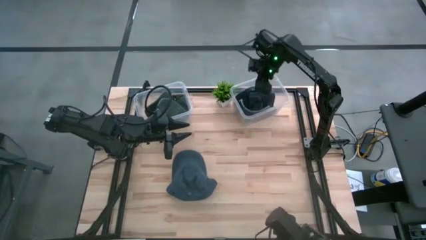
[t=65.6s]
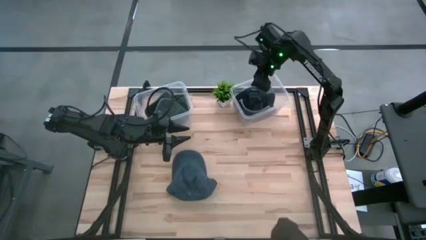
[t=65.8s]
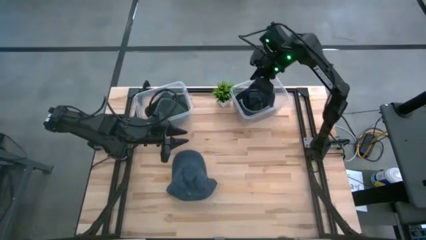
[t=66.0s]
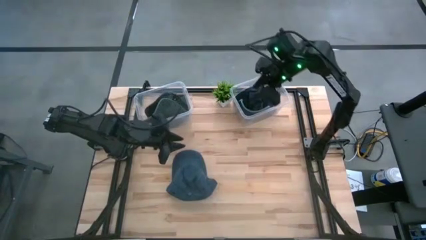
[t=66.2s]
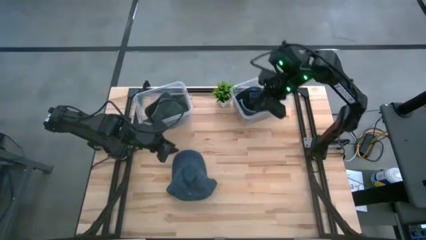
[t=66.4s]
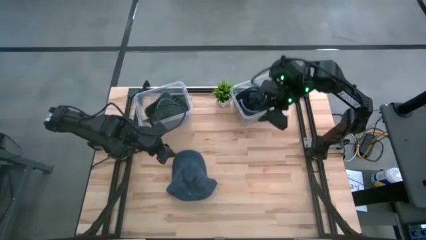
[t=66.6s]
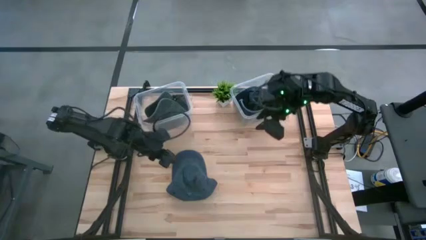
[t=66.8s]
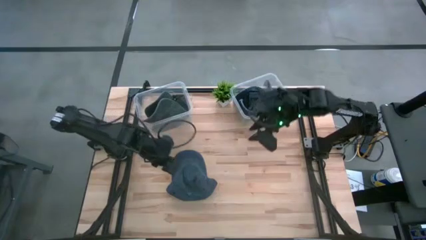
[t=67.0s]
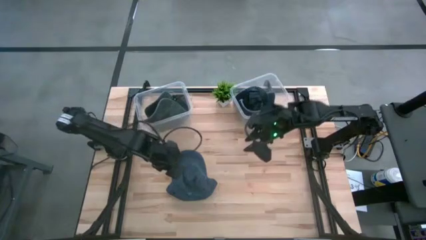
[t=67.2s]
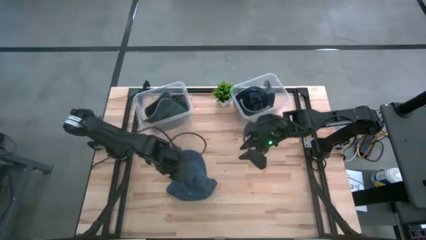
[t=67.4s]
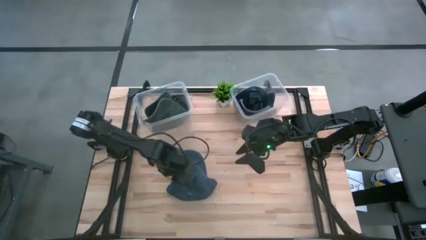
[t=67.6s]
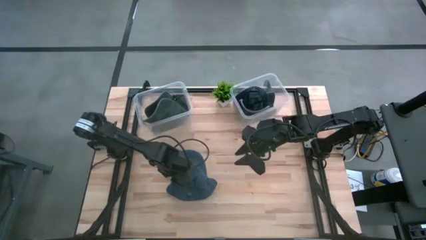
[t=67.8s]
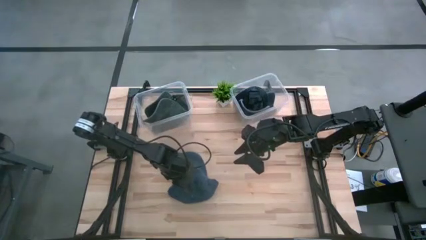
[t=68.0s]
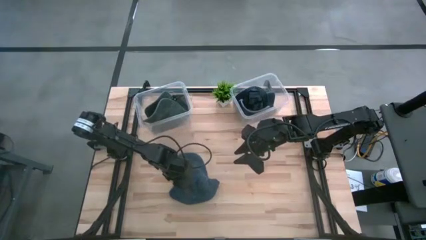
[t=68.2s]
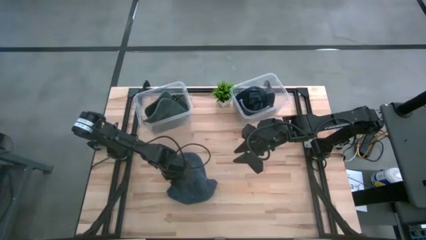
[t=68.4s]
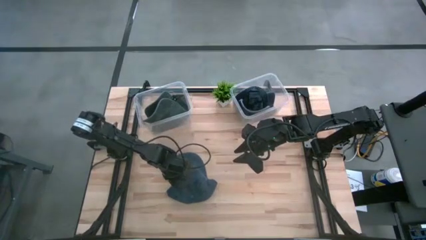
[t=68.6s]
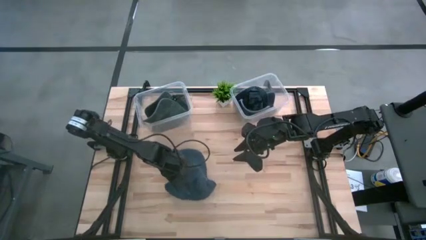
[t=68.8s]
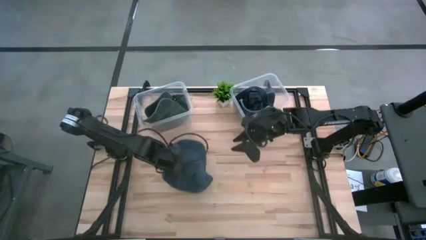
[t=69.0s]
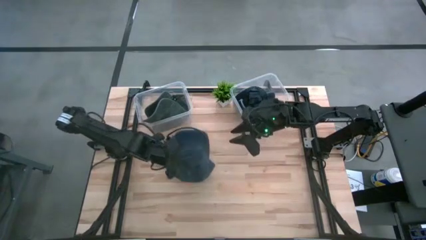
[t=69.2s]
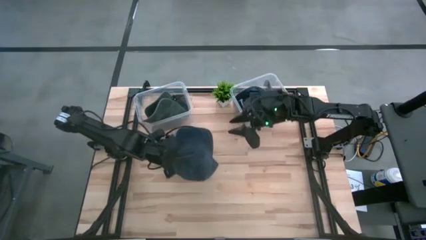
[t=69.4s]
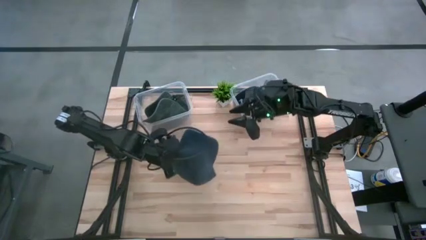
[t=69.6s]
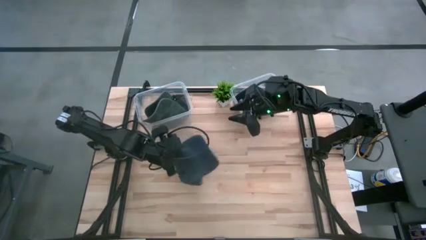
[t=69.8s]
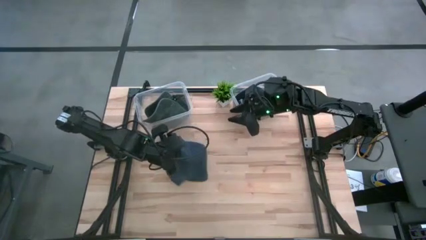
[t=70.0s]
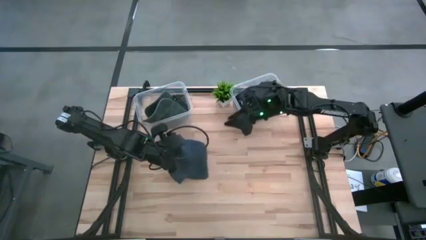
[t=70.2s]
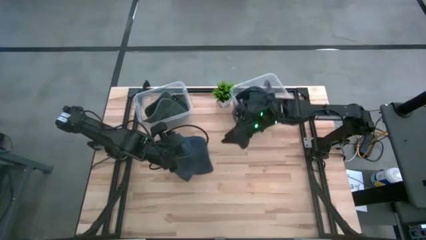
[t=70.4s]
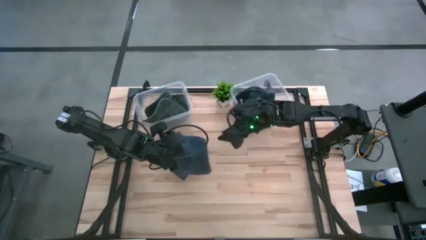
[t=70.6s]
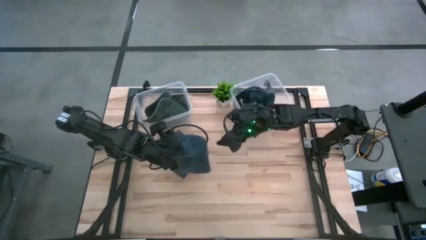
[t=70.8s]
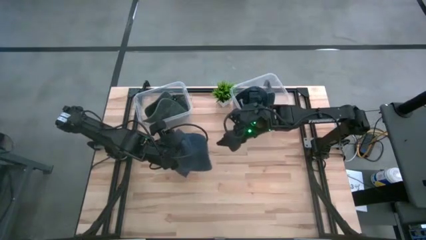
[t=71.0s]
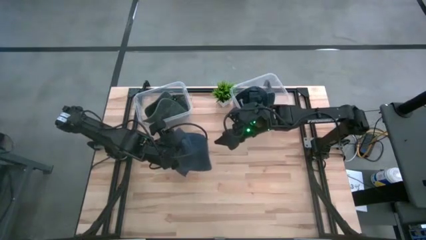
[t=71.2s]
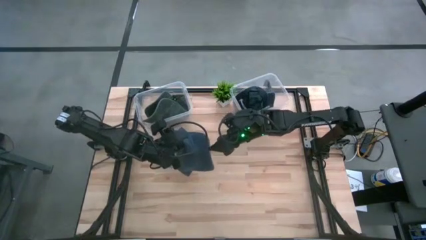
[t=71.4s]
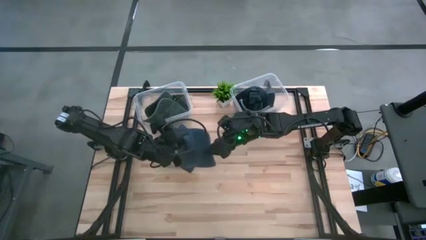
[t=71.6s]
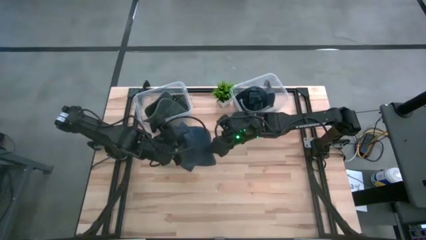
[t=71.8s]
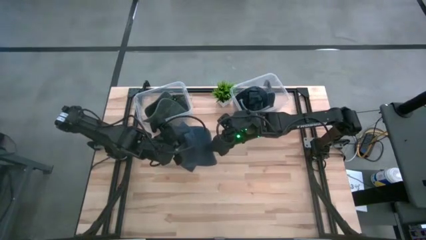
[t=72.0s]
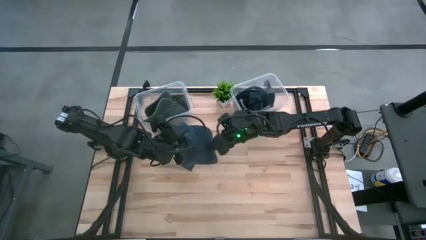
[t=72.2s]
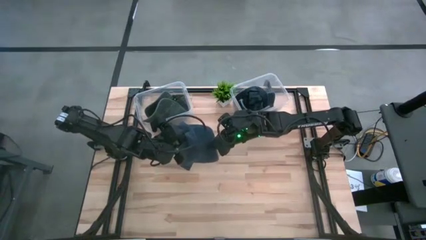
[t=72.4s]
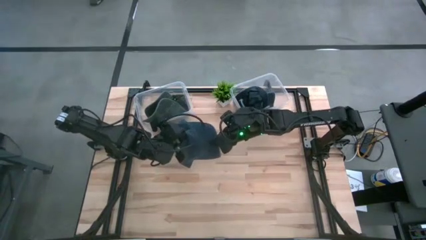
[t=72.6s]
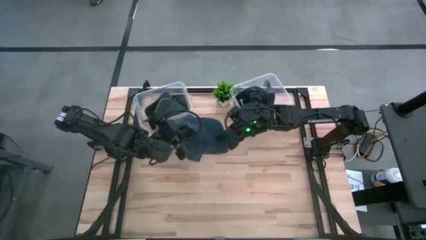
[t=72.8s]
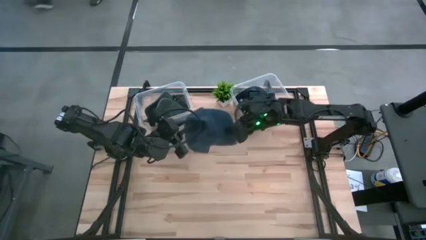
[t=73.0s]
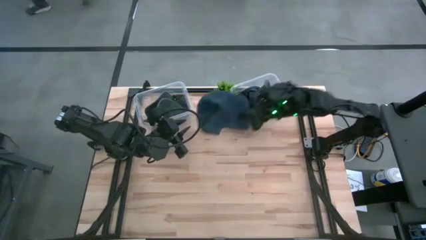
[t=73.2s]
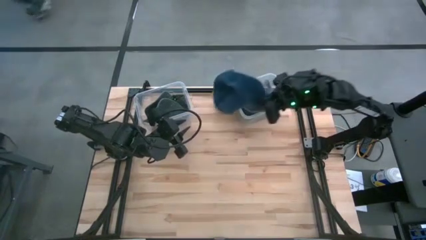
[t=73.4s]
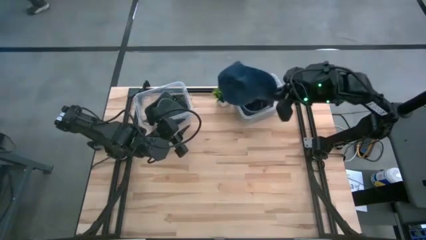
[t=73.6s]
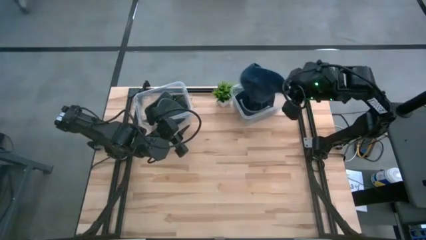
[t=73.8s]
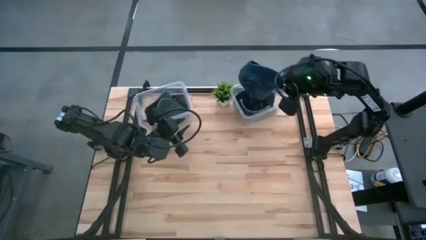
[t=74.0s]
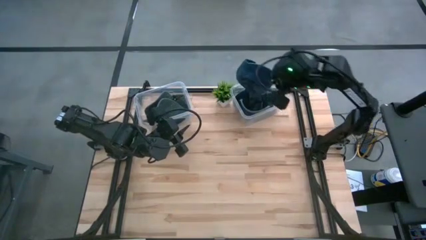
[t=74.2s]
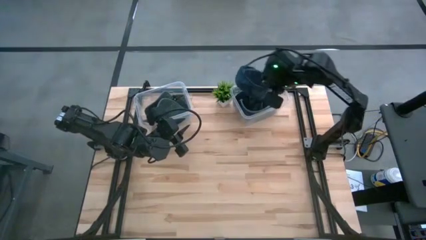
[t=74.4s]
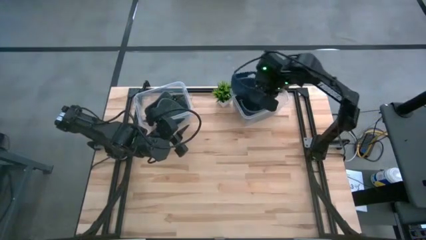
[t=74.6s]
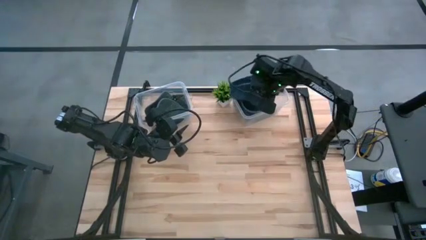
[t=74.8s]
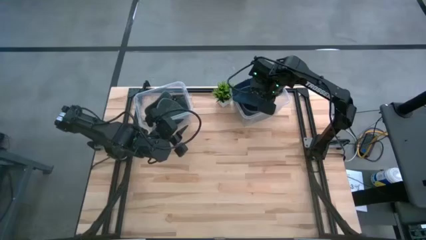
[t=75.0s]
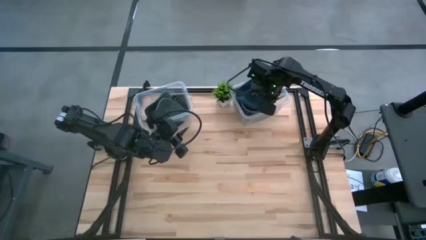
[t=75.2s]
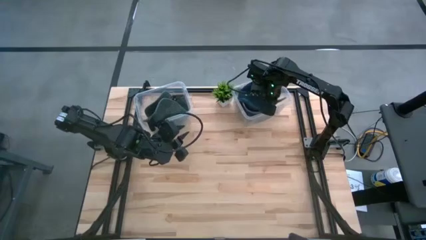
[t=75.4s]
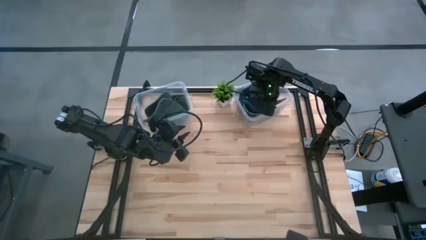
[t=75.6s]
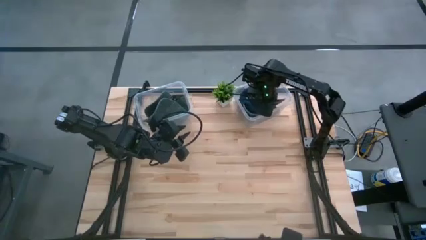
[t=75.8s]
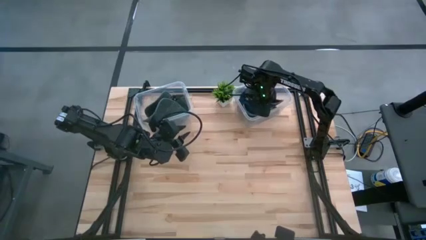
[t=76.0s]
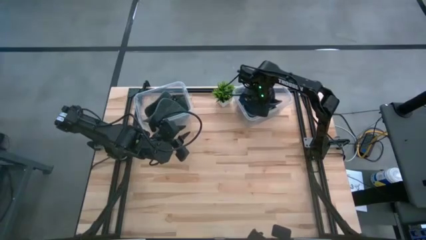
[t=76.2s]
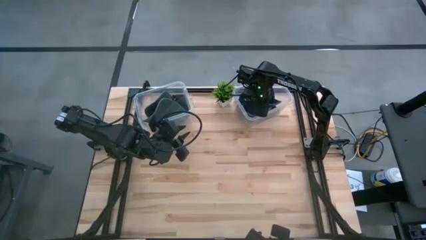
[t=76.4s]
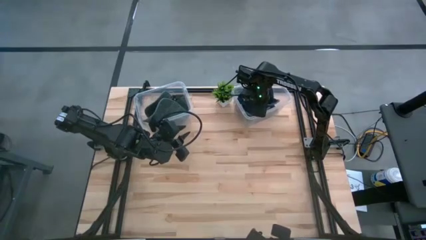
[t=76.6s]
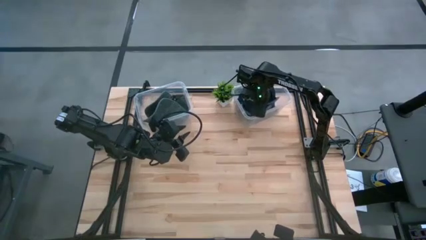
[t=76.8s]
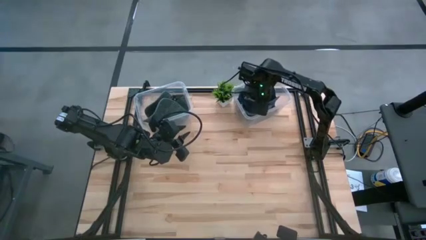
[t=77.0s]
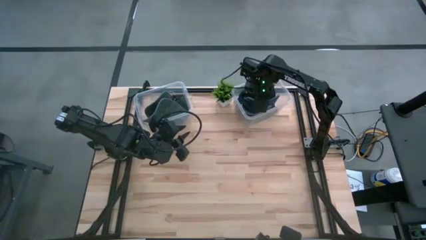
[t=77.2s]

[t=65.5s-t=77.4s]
Task: Pick & Place hat
Put the blue cap into the right transparent bin

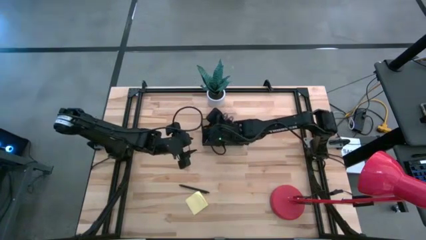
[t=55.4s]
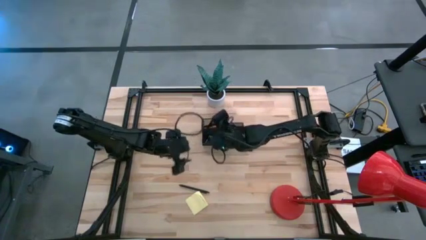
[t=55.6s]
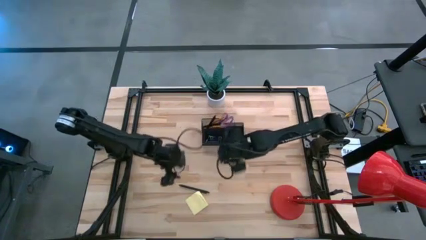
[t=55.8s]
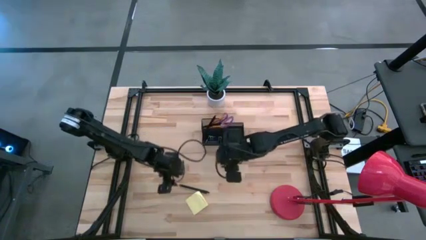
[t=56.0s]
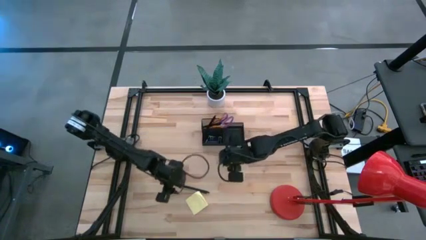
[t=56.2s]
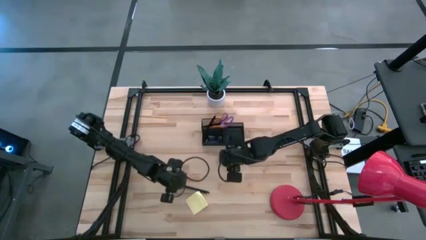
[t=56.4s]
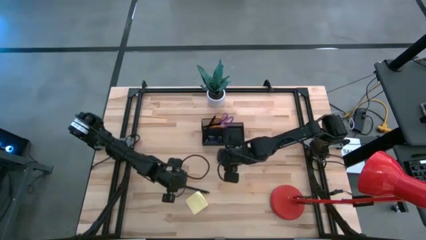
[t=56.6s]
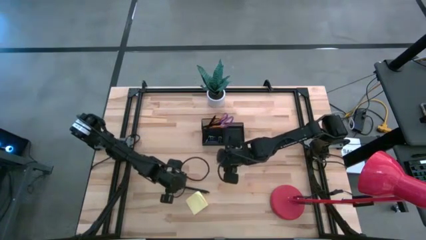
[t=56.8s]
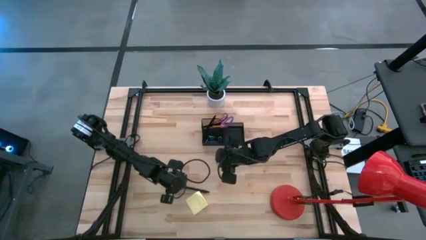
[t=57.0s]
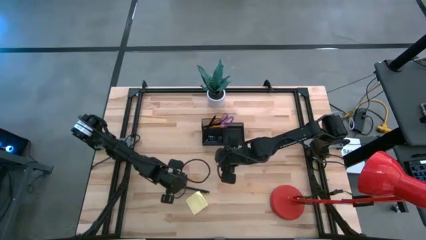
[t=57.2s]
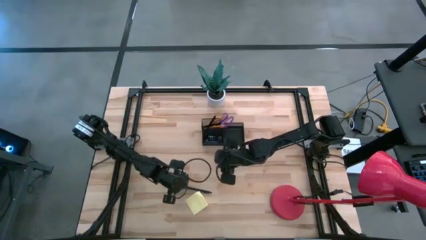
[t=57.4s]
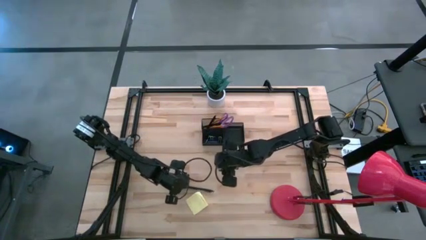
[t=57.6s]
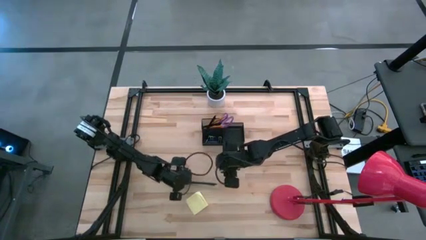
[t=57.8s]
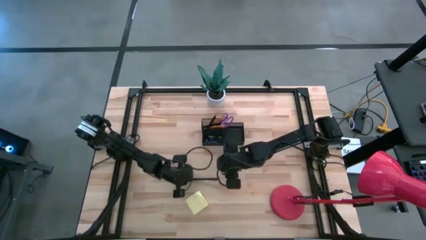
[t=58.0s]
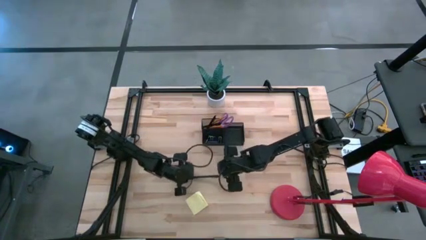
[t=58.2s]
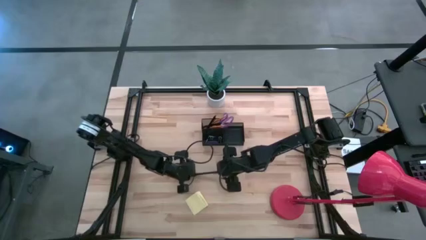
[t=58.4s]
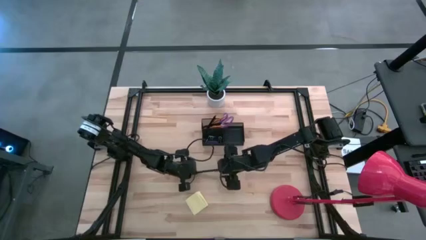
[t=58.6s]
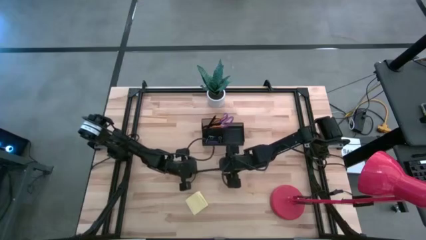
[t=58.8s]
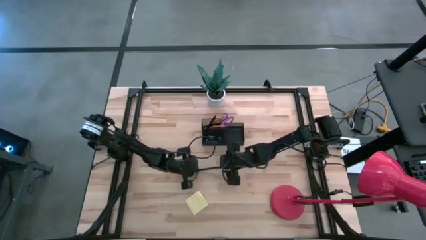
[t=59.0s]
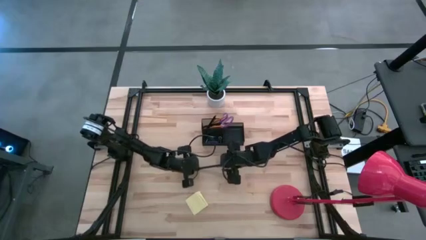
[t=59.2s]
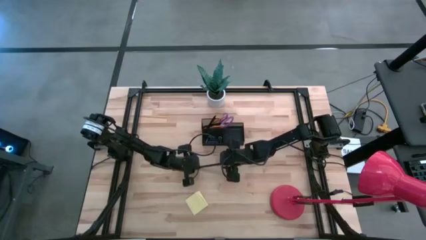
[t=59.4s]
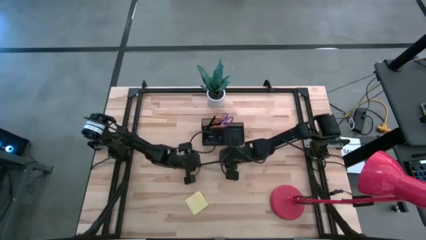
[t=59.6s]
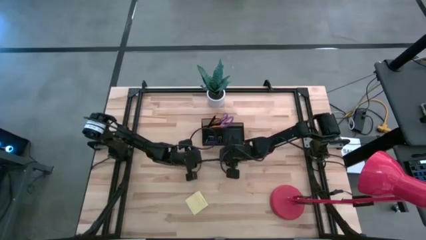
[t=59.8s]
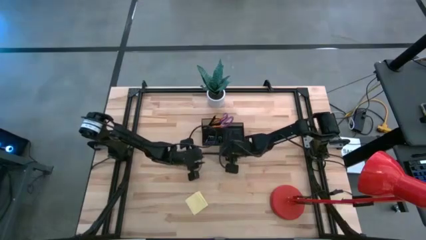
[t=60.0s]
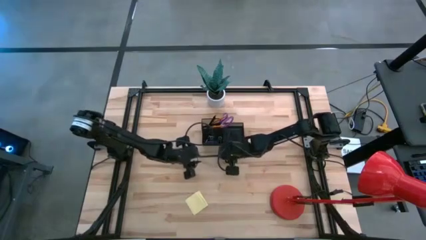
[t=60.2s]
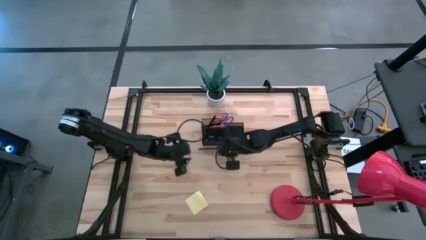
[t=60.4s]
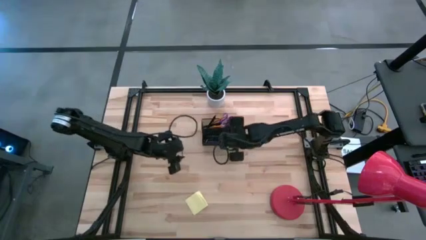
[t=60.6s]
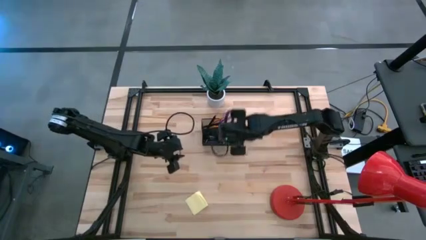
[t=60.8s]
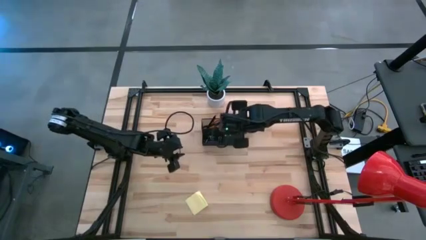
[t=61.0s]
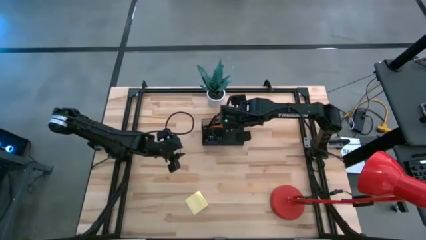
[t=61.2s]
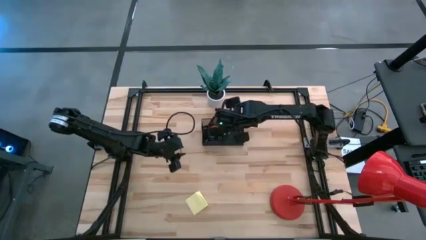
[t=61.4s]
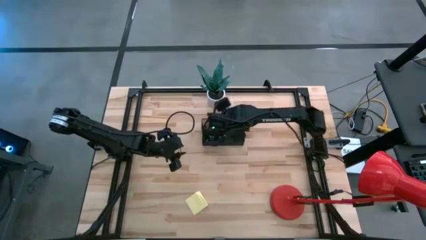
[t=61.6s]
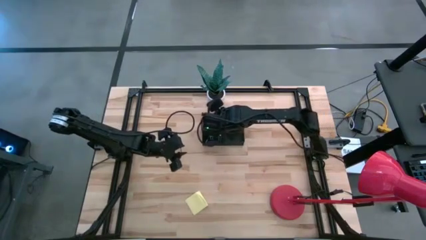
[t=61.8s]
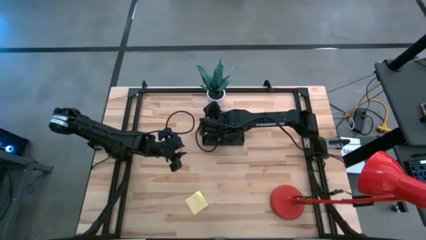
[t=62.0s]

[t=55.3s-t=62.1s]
Task: Pick and place office supplies into organizer
Put the black pen into the black organizer
